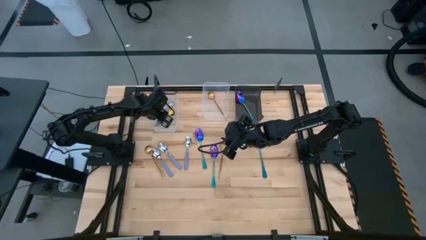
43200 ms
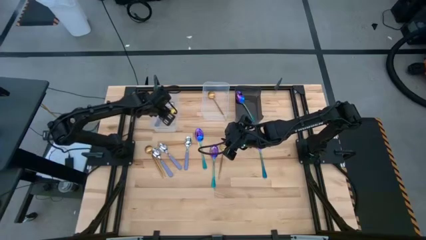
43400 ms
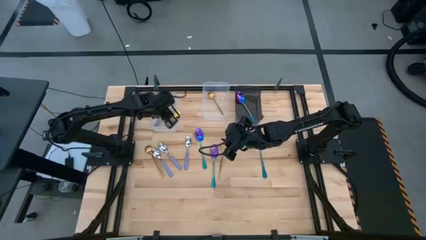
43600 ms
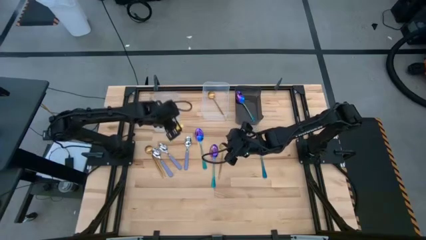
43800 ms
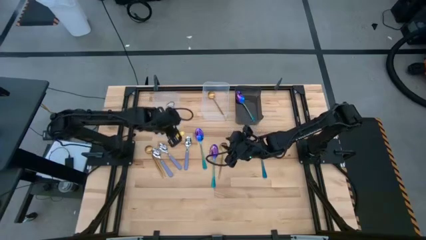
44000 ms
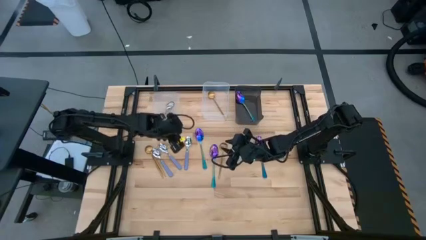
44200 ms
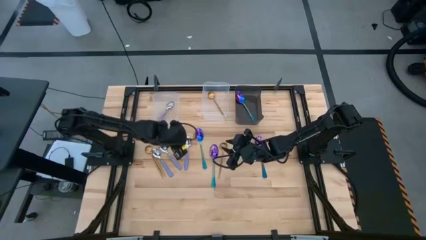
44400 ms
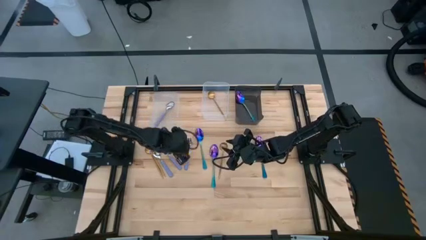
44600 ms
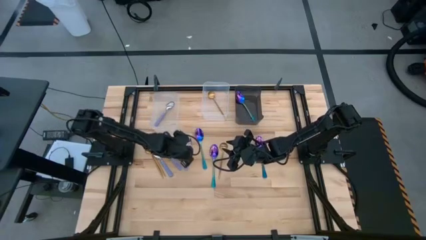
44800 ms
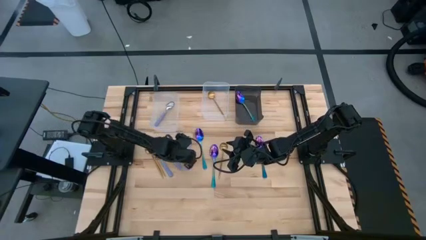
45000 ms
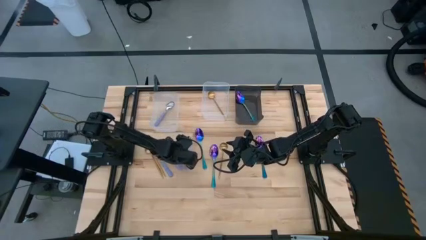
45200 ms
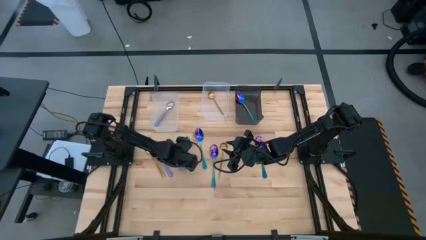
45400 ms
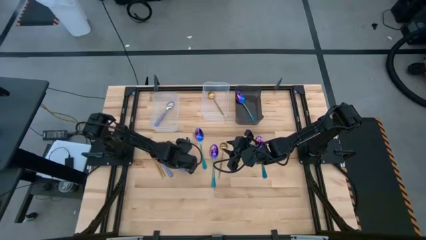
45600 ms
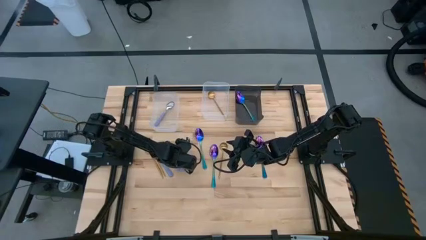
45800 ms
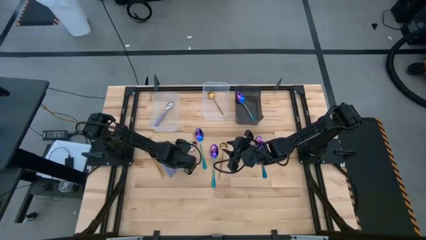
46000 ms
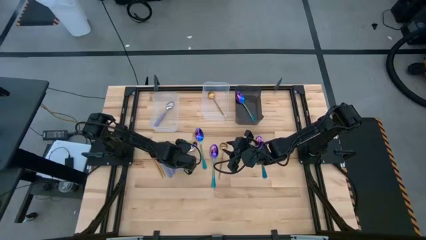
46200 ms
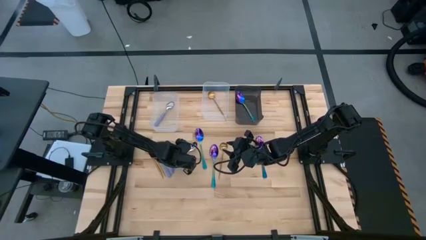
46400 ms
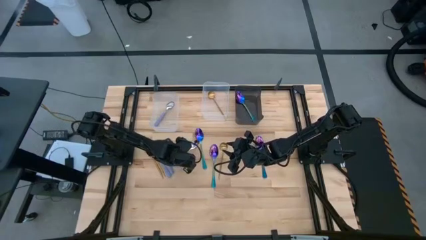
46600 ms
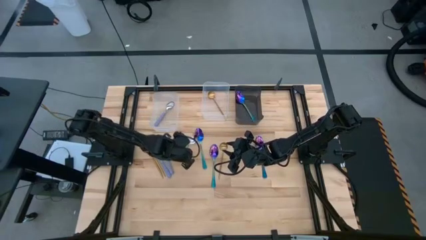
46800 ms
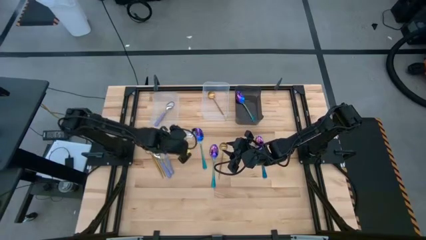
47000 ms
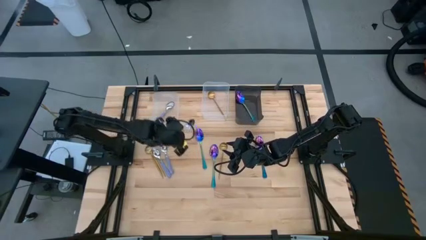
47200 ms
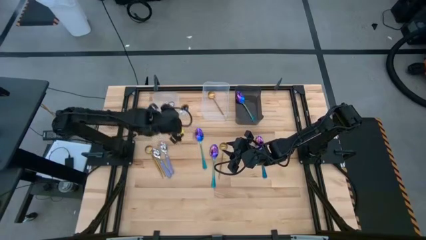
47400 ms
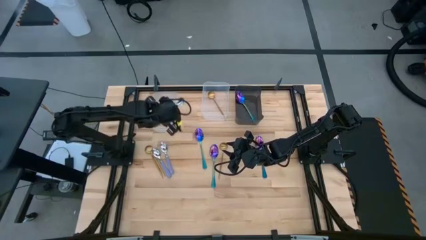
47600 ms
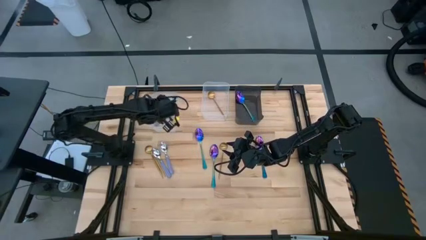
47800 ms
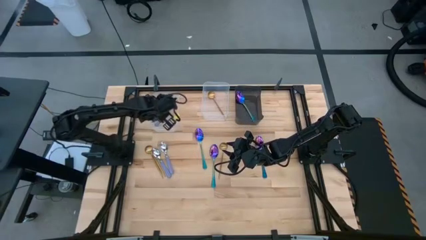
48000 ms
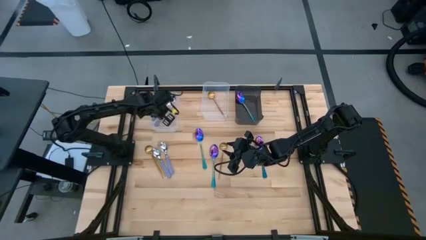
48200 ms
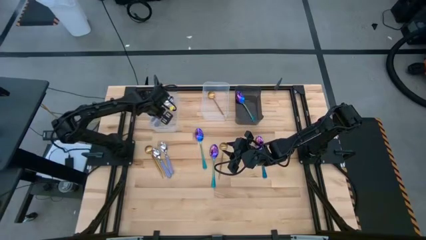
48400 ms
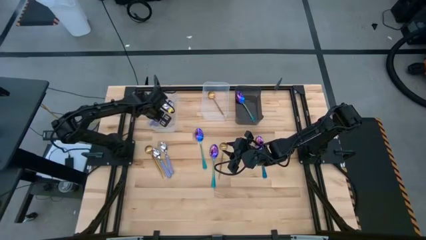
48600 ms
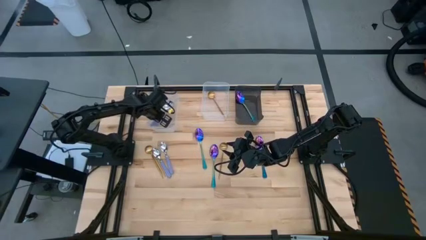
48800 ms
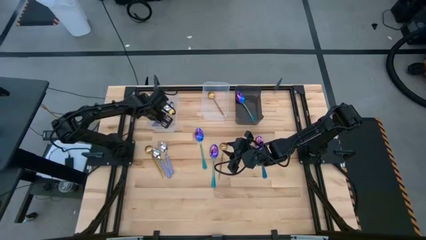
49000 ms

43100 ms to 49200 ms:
Task: Sort silverware by color (type)
Put the purple spoon into the left transparent bin

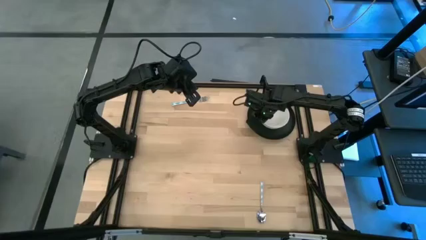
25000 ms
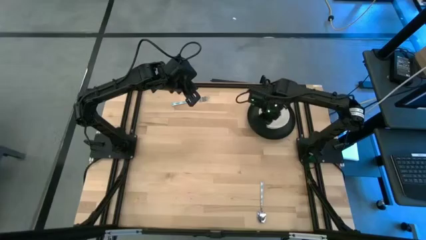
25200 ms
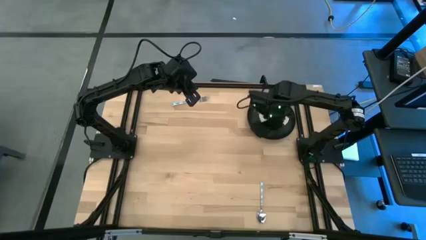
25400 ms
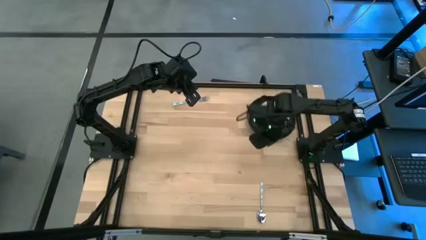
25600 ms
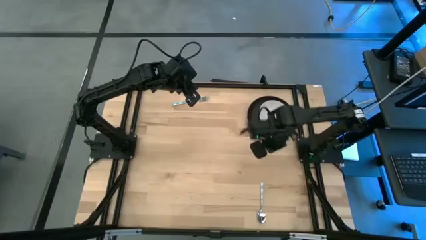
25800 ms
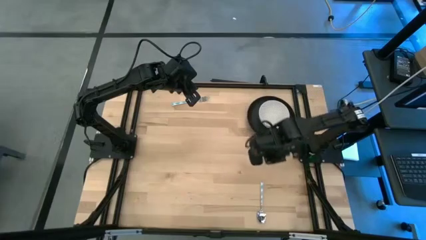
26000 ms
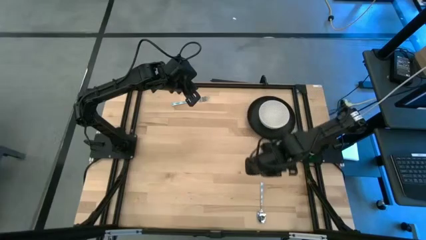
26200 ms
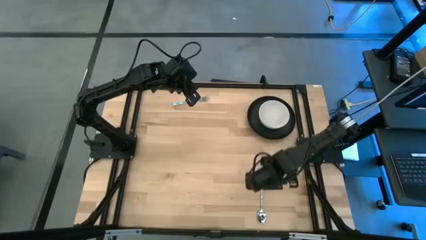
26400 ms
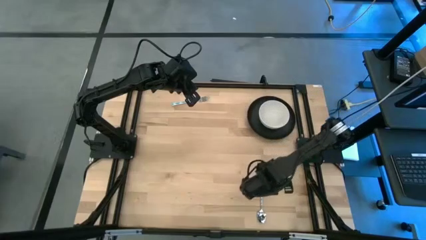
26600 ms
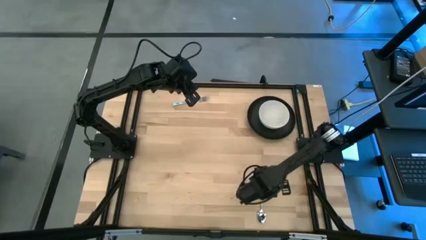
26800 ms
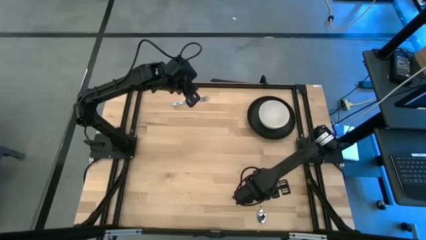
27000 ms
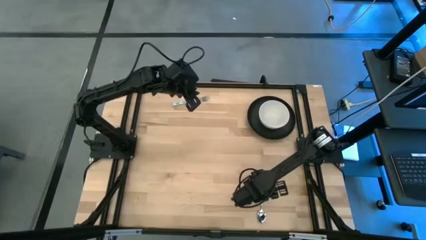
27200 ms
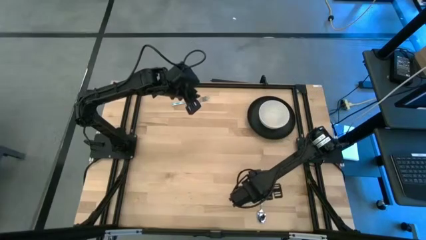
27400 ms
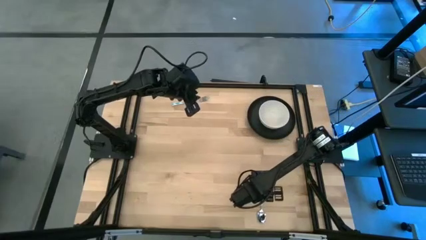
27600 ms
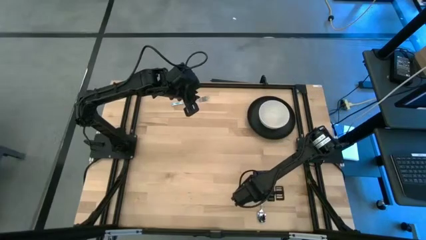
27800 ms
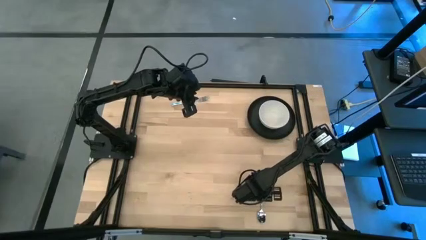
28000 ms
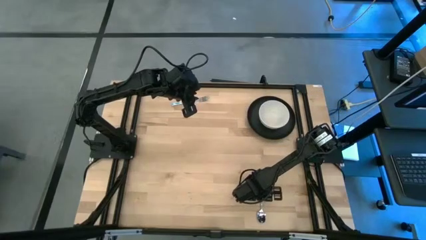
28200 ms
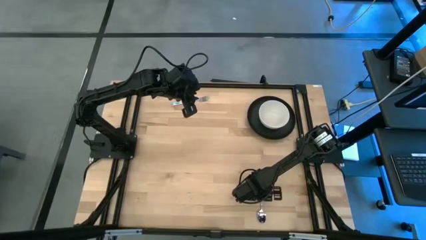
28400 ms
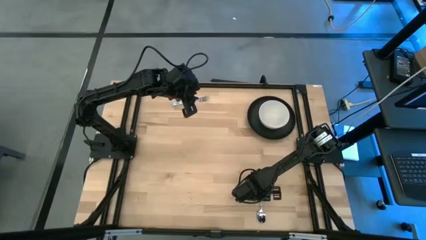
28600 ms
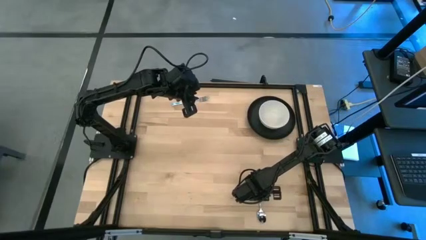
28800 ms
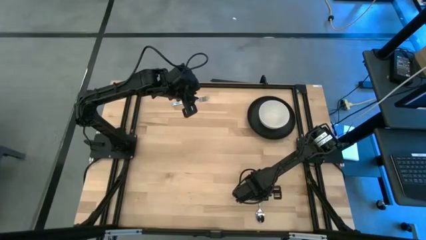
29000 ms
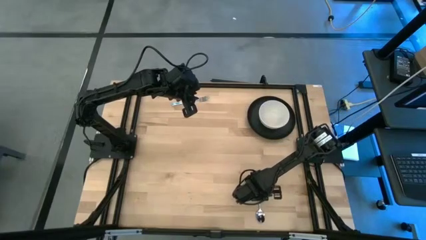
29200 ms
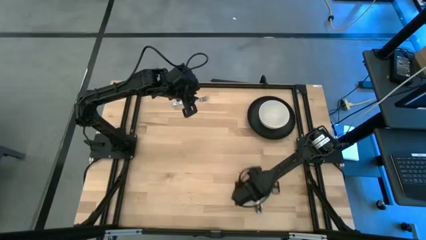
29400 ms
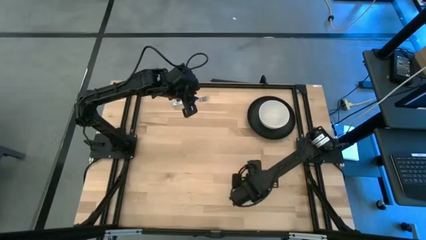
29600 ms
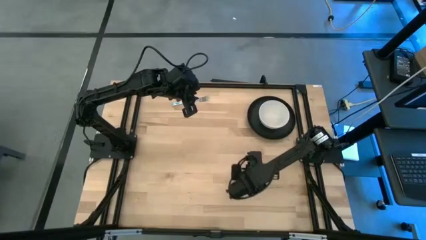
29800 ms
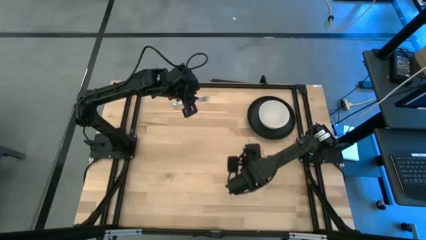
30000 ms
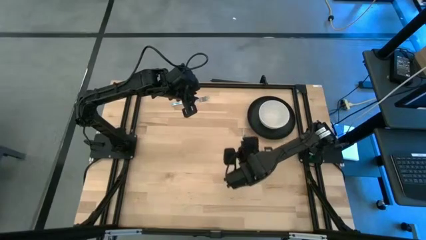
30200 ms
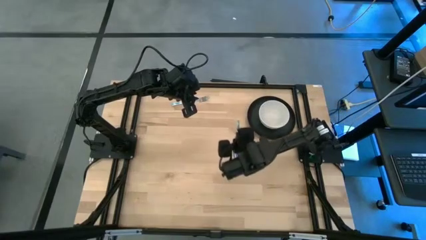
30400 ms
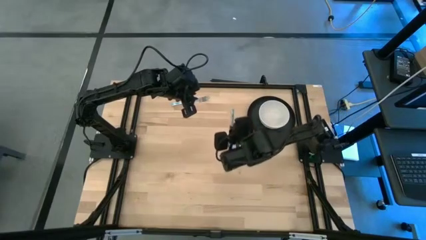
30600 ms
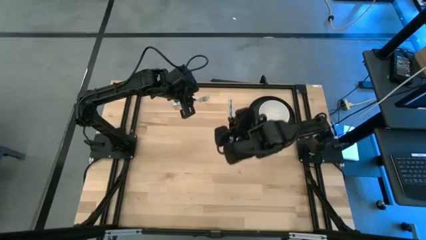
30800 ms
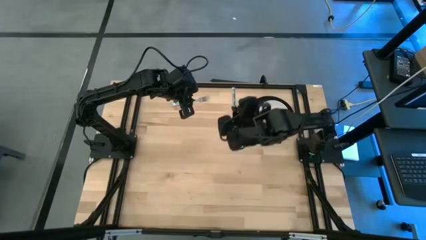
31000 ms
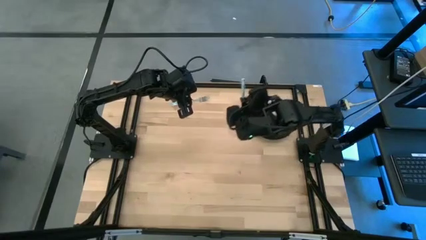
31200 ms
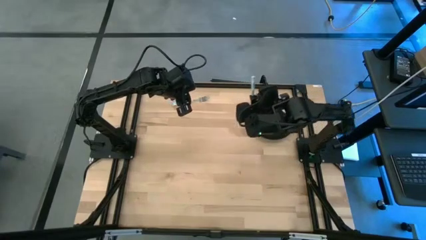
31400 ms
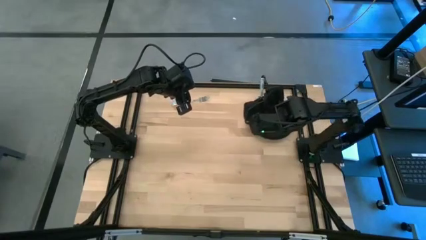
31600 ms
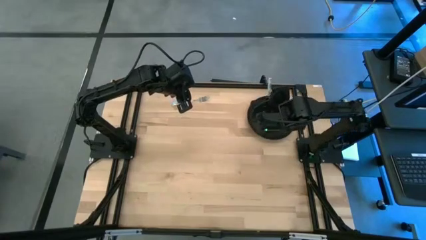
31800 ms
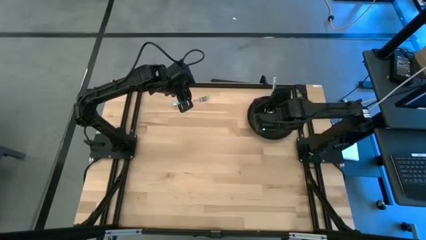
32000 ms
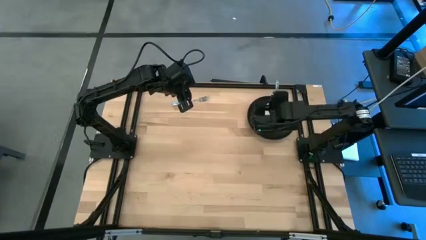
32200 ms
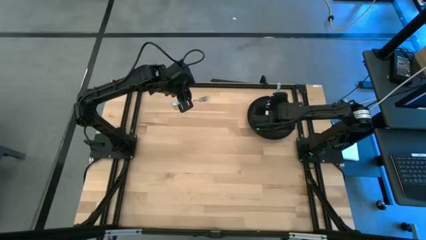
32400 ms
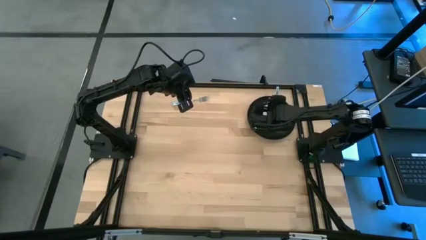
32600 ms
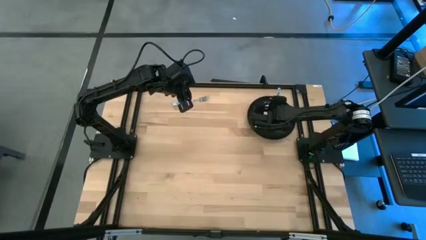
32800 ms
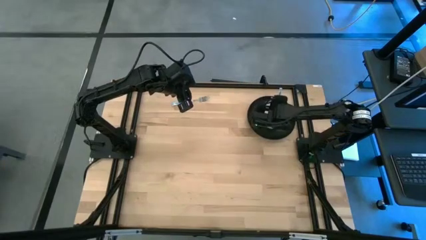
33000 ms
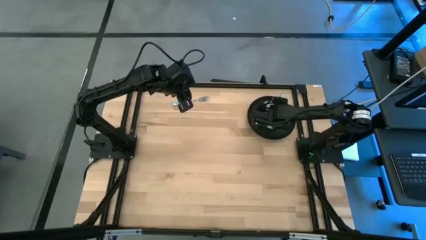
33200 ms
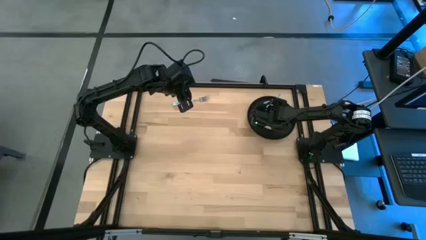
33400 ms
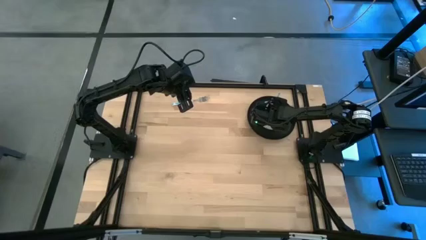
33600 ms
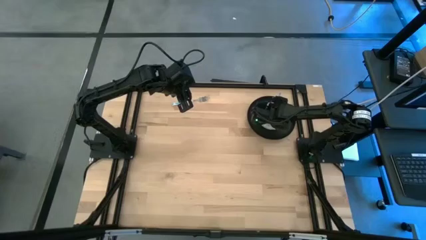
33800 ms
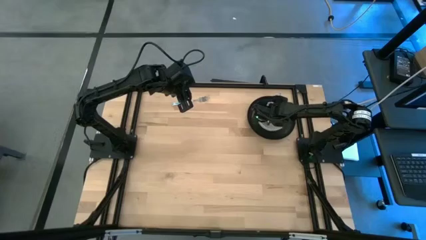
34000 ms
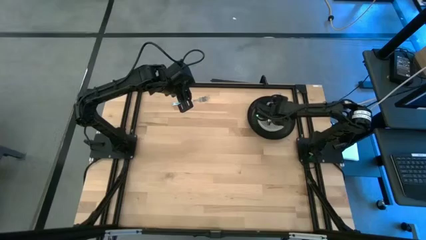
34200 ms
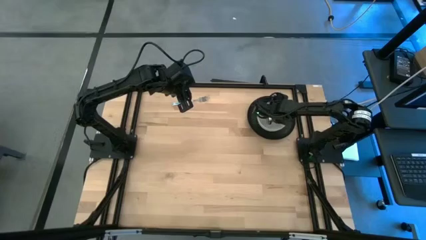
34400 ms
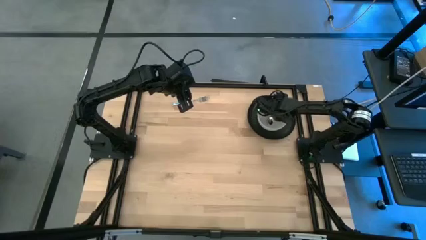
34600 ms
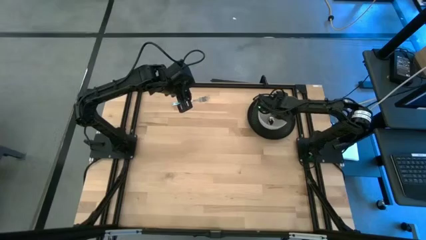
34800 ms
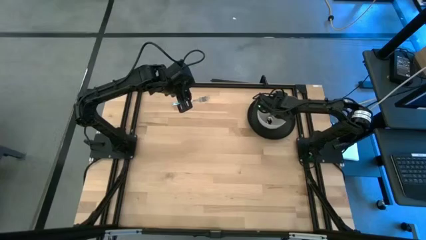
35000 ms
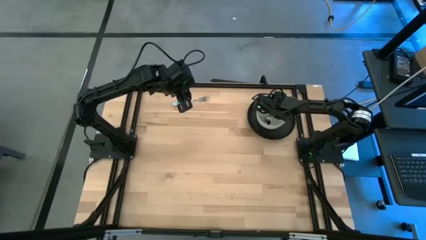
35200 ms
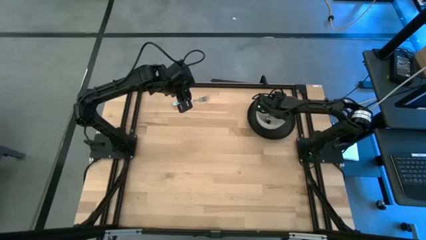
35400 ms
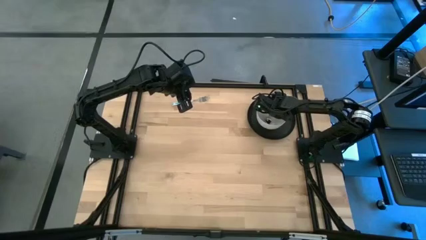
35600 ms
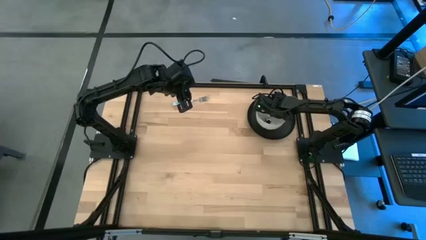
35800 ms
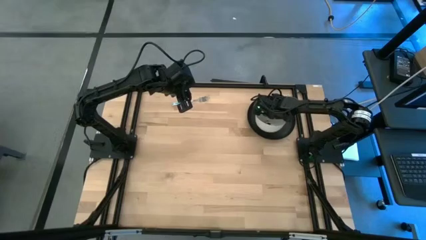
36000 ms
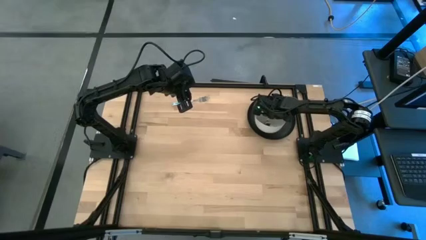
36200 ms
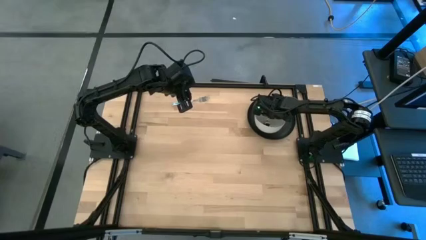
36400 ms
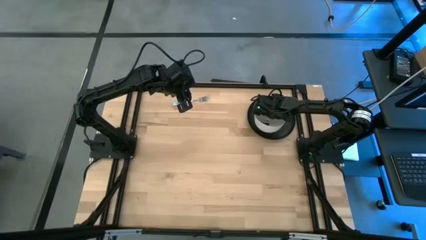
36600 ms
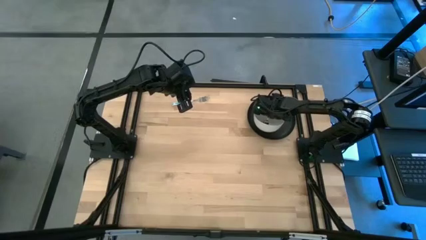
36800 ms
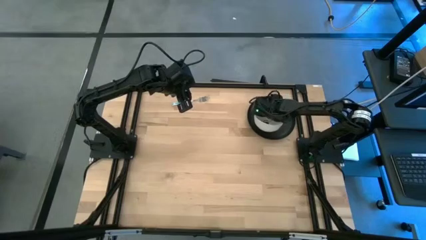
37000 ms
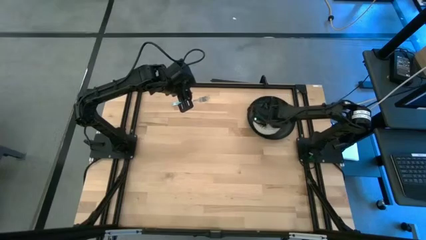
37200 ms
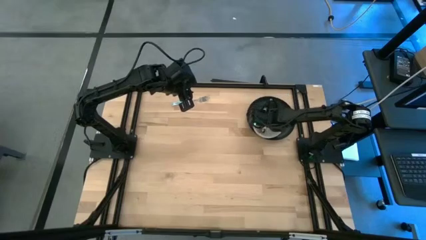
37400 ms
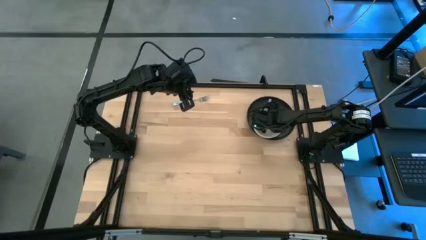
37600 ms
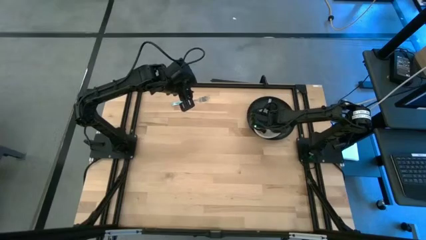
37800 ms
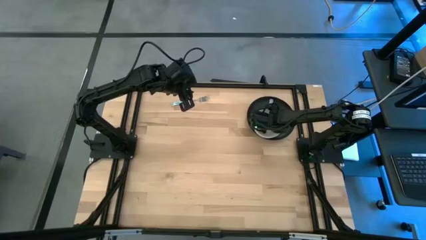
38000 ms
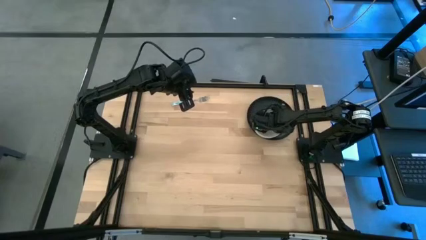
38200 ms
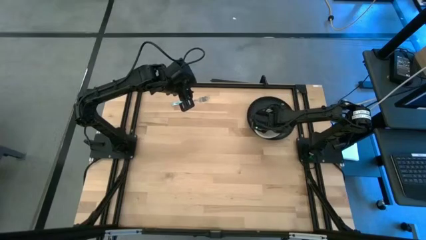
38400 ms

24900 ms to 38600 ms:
Task: Set table place
Put the blue spoon into the white bowl
